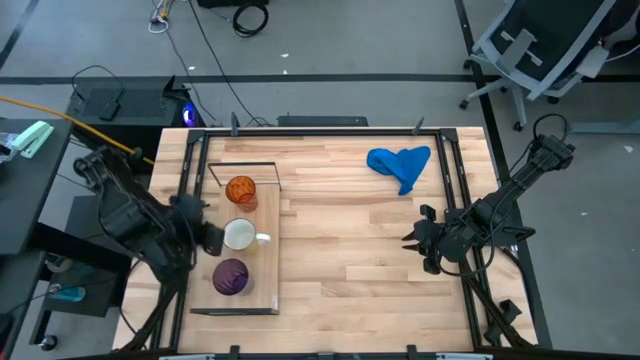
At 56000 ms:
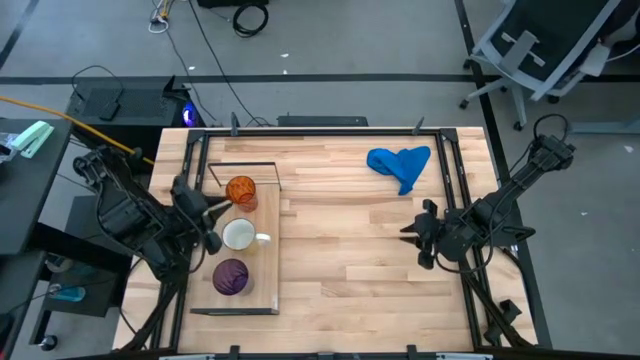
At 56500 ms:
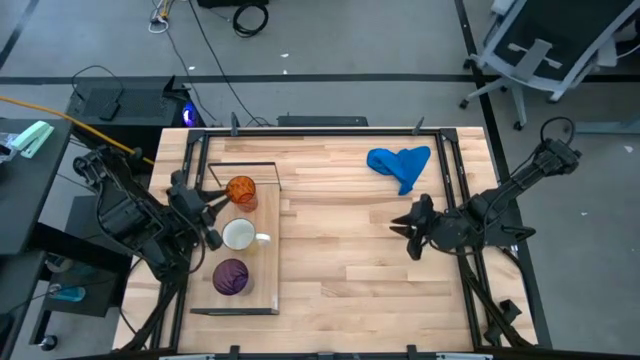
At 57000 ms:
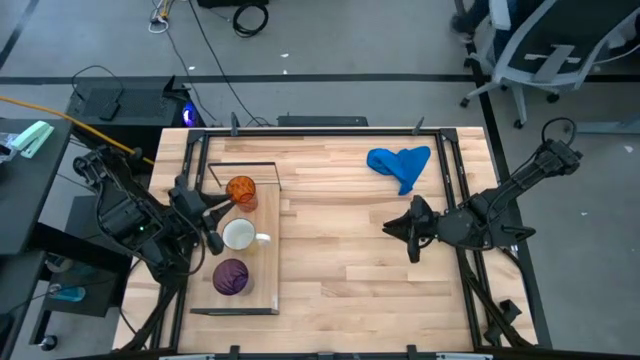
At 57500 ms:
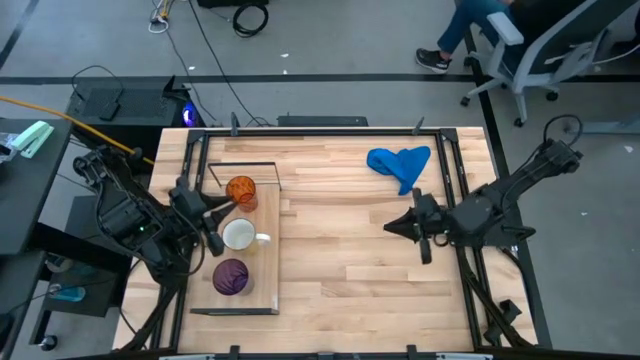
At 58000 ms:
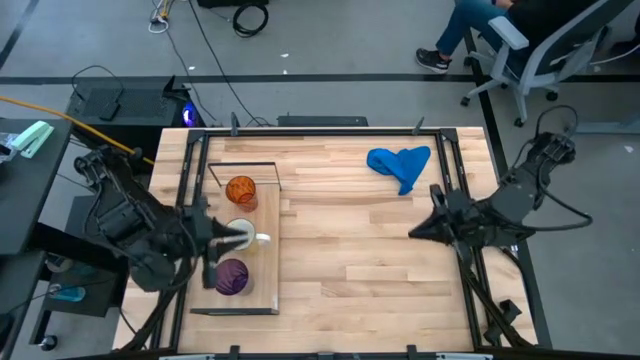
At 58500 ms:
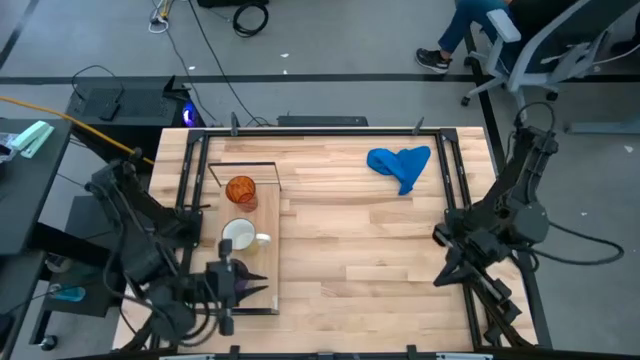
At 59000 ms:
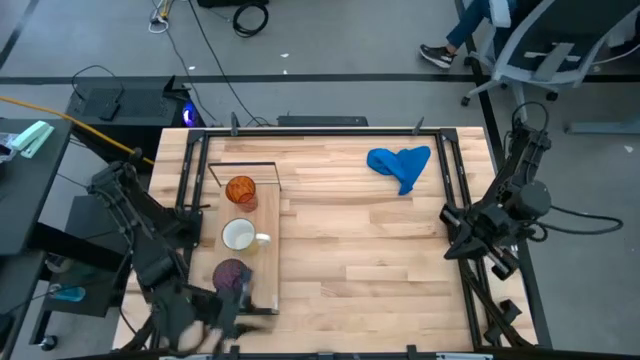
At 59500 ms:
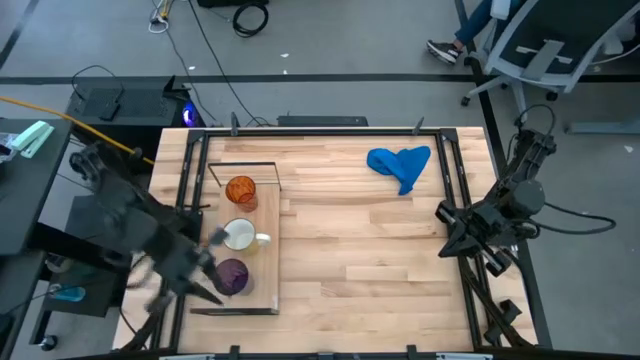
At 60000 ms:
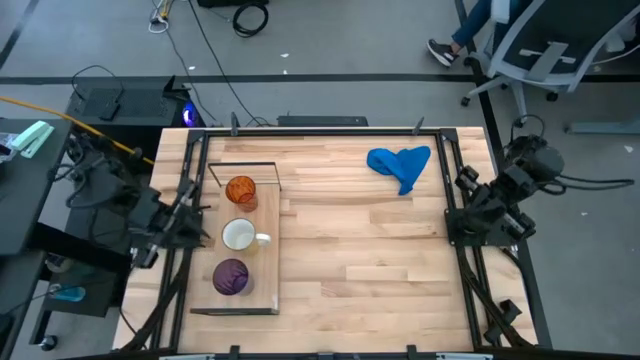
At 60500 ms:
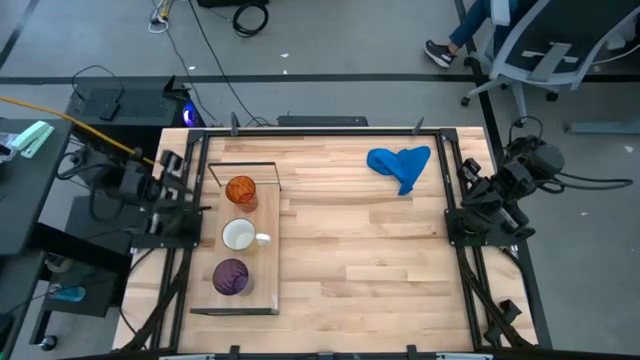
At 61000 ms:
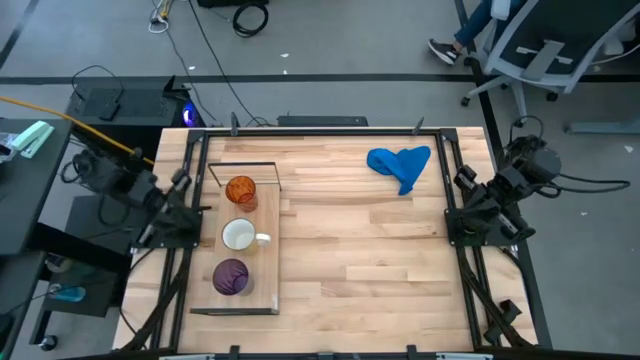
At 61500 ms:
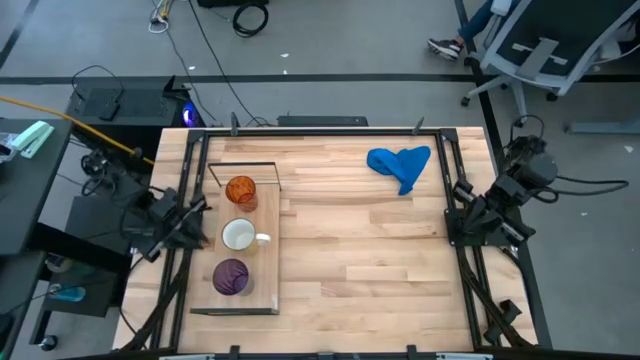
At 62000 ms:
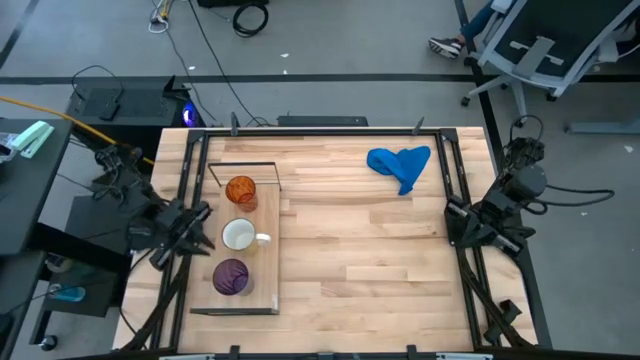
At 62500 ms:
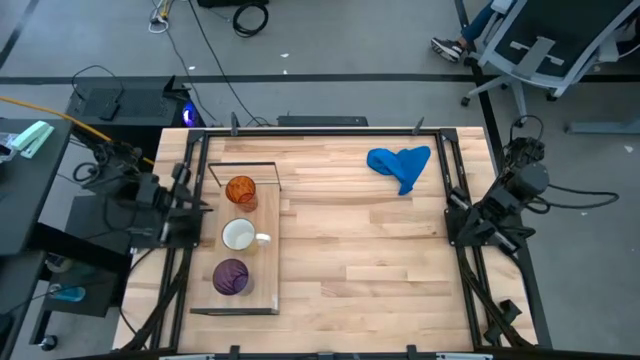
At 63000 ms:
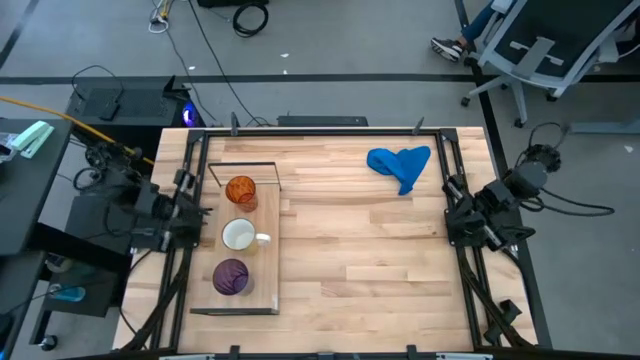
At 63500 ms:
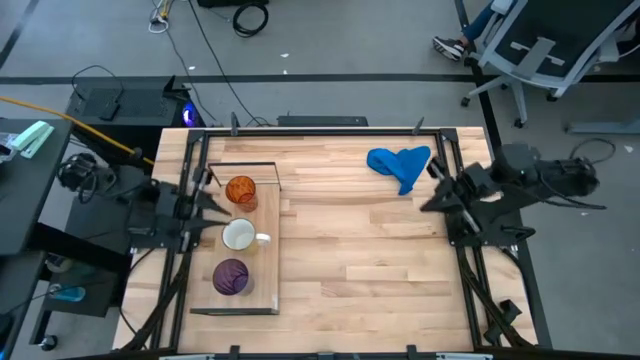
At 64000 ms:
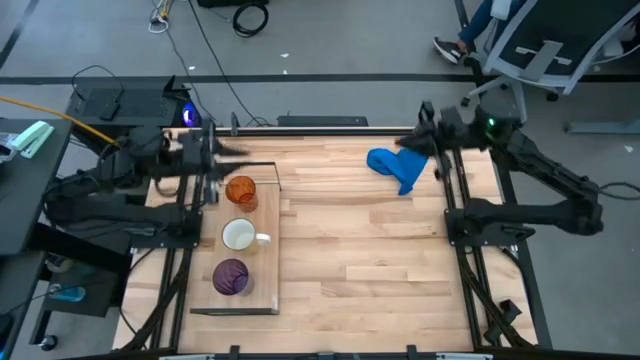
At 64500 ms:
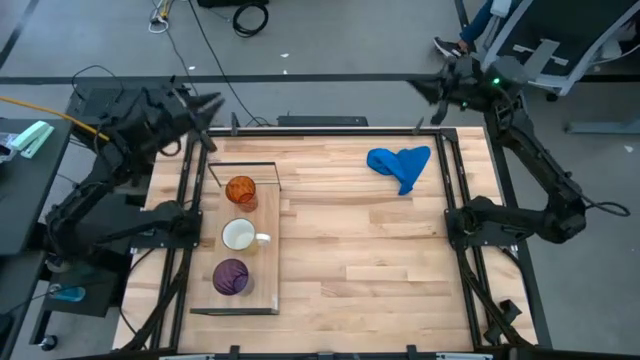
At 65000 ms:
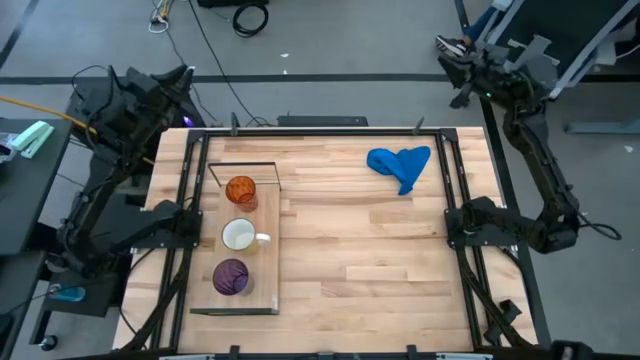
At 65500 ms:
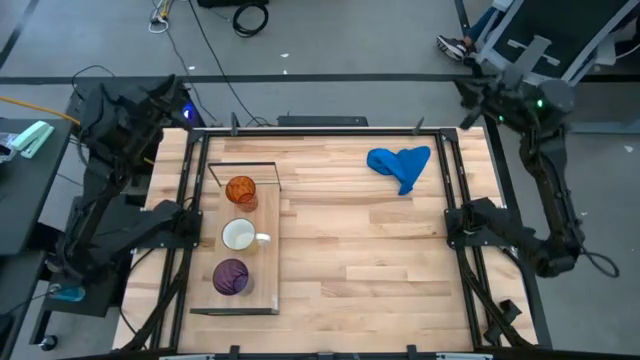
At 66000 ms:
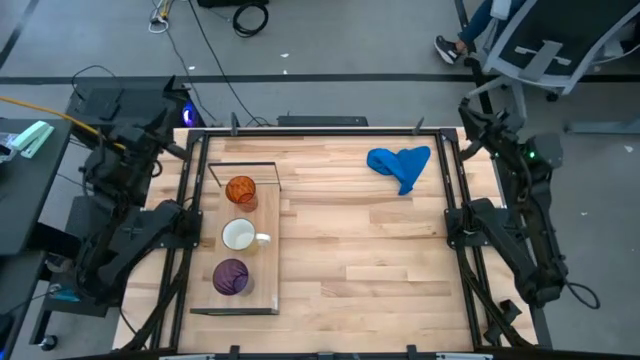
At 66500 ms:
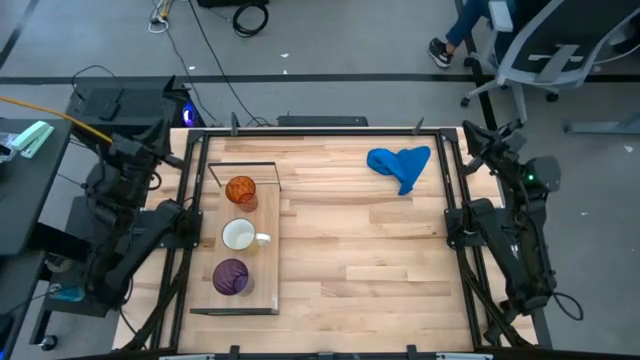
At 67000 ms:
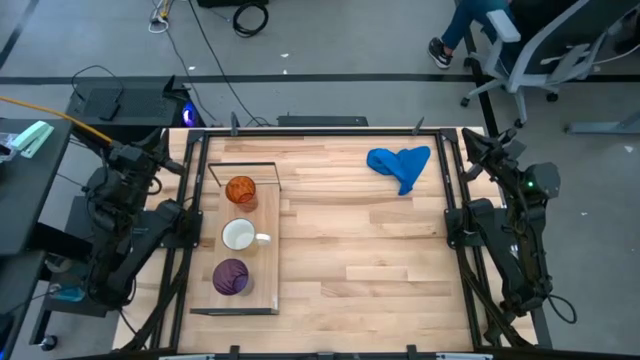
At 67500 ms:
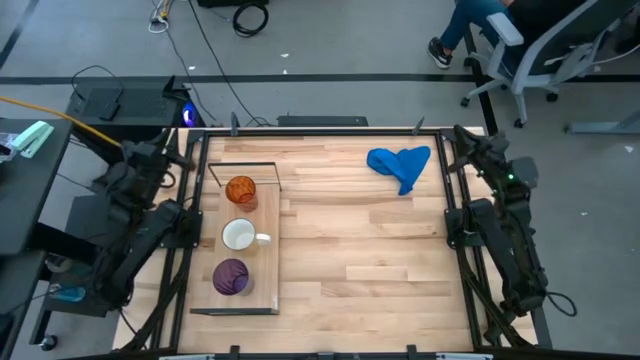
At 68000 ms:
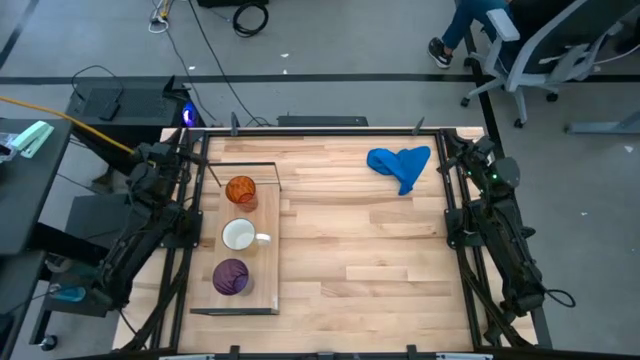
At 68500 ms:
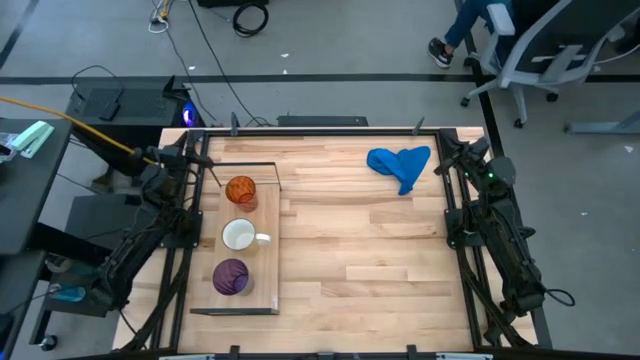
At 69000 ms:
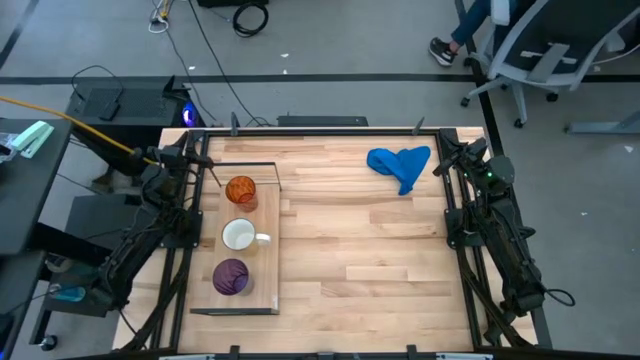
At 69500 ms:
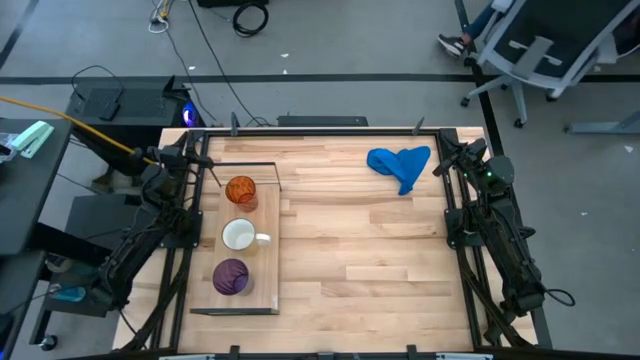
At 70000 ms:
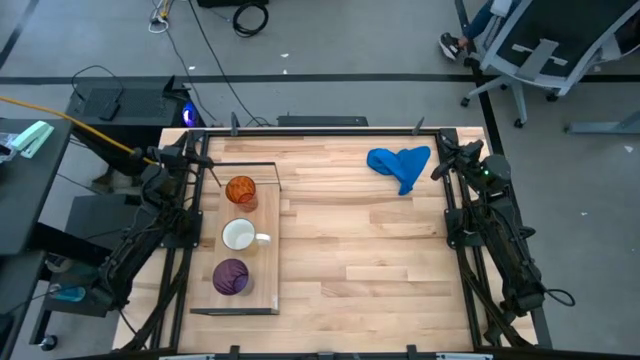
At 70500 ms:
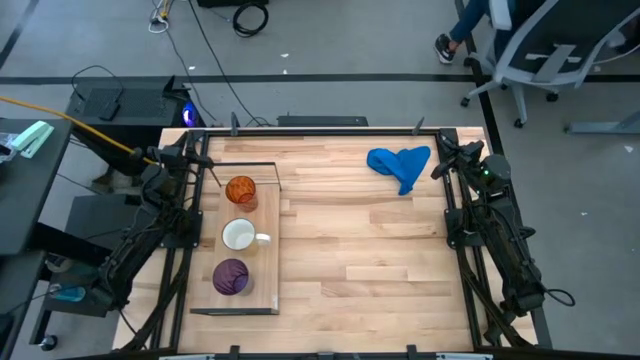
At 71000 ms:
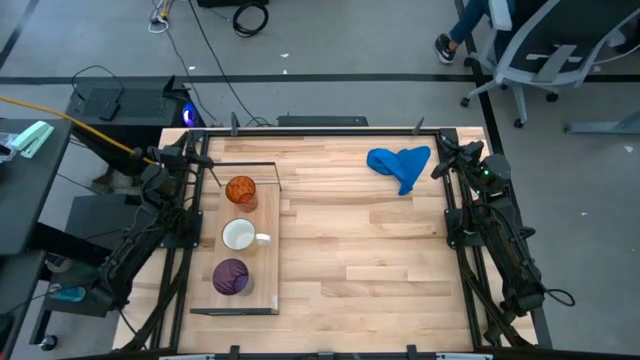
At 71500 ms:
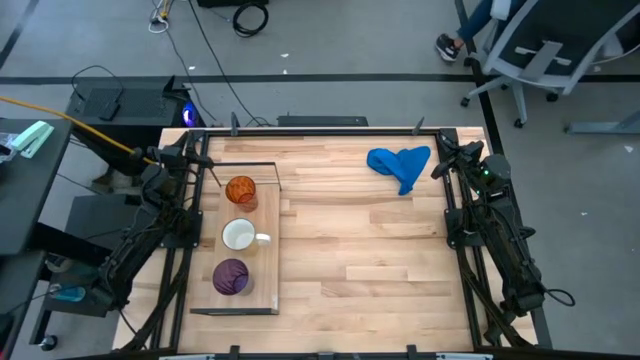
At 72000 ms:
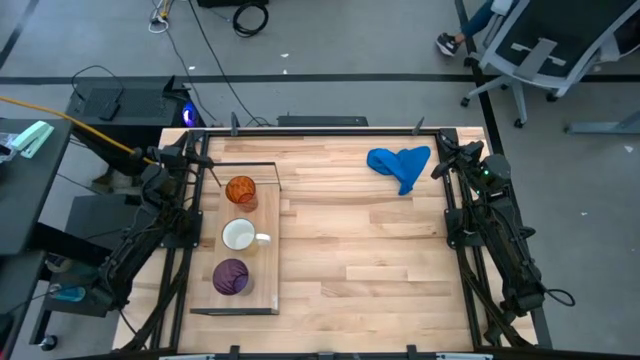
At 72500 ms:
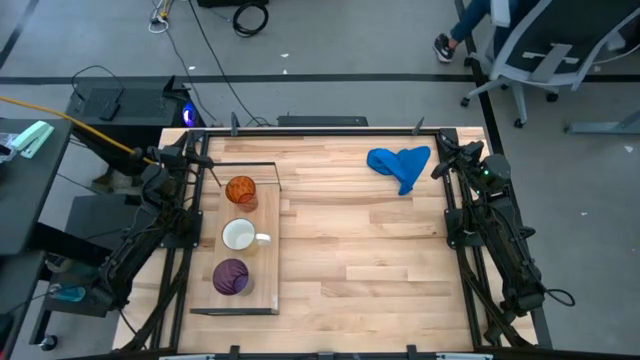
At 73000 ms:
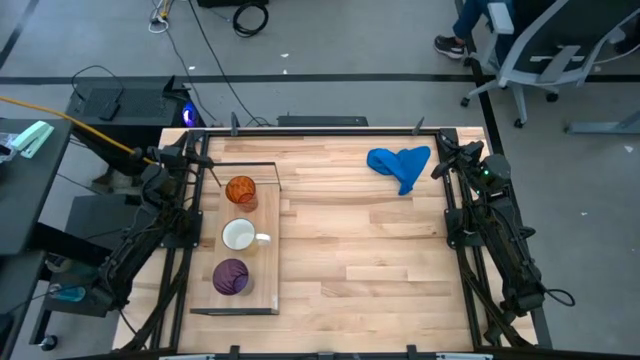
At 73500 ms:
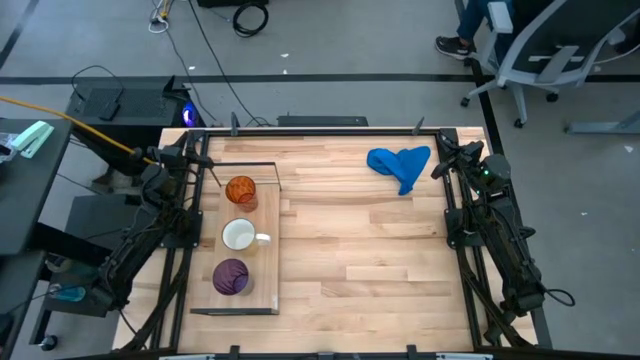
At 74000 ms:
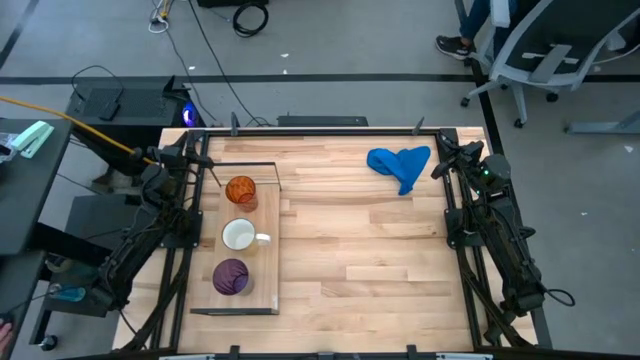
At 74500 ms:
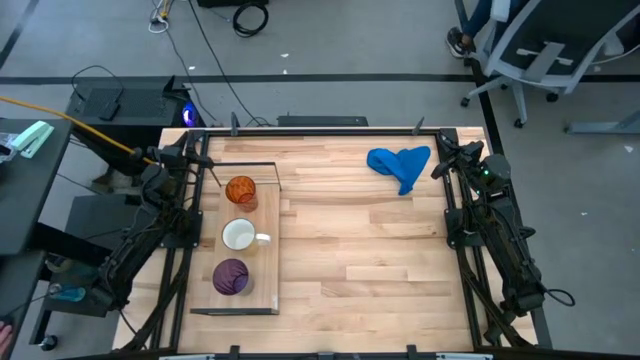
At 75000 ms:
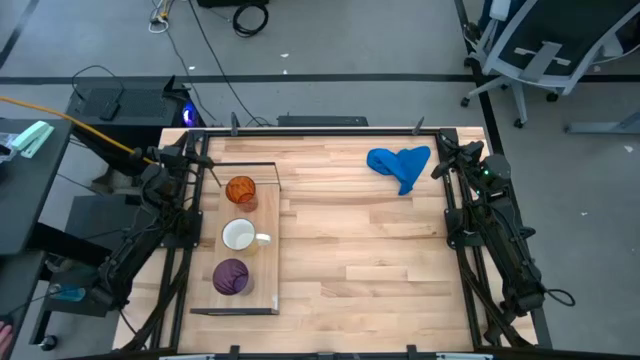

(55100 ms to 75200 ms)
Task: Stack small to large cups/mugs on shelf
Return to Home Position
